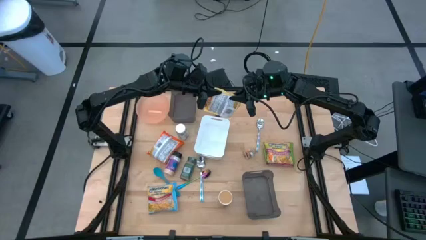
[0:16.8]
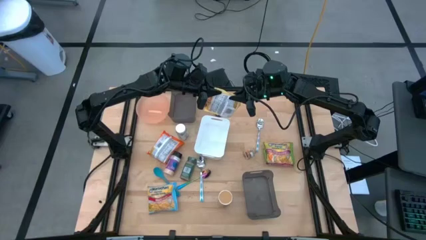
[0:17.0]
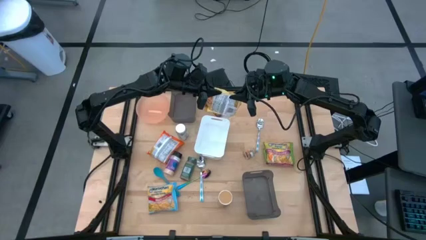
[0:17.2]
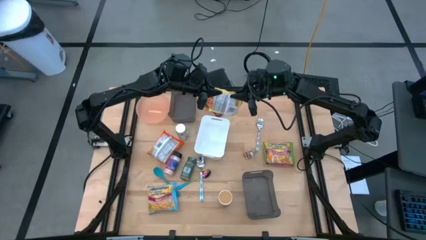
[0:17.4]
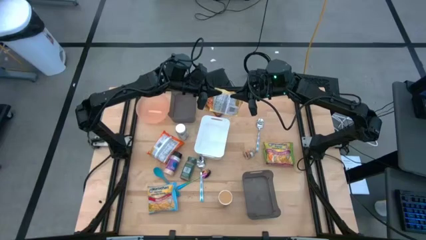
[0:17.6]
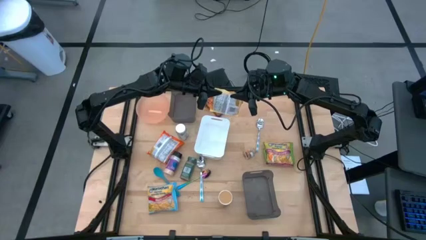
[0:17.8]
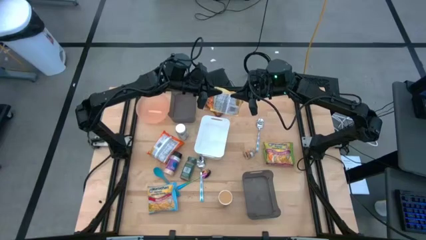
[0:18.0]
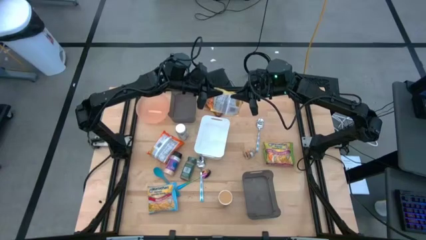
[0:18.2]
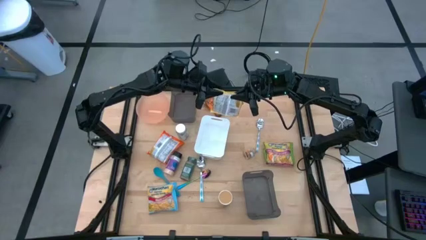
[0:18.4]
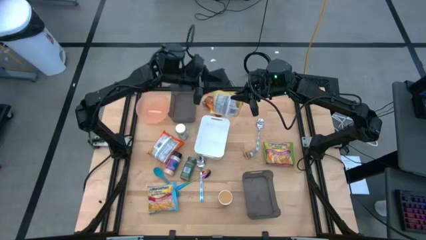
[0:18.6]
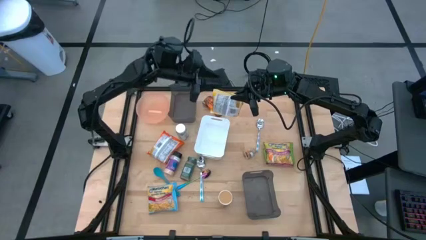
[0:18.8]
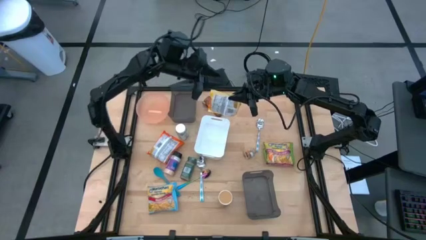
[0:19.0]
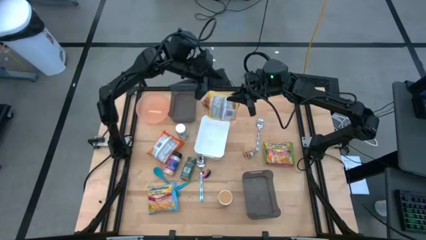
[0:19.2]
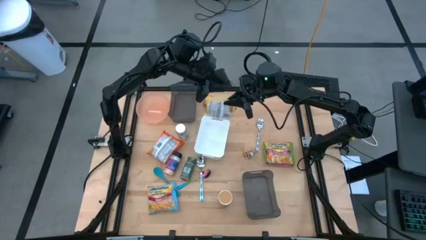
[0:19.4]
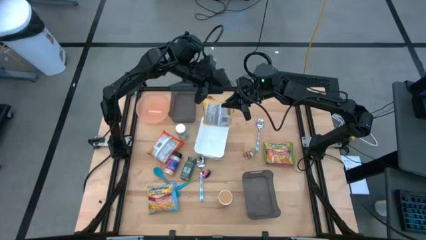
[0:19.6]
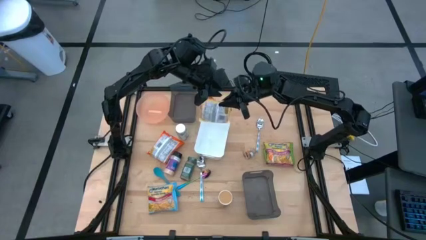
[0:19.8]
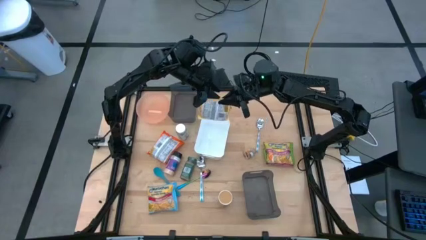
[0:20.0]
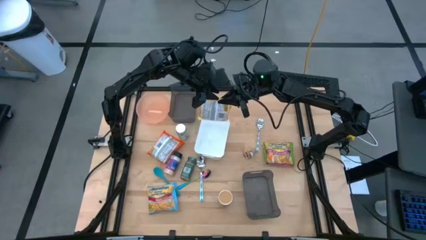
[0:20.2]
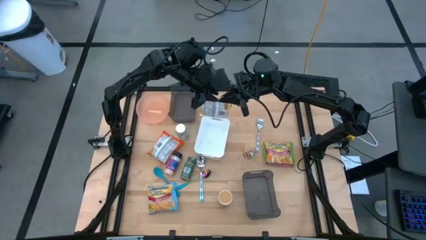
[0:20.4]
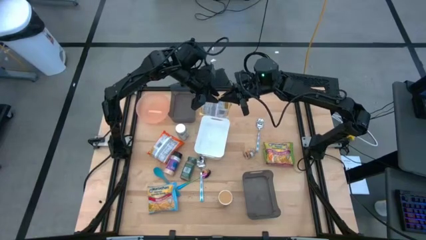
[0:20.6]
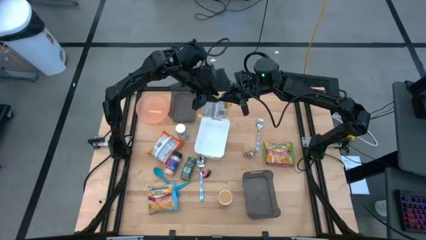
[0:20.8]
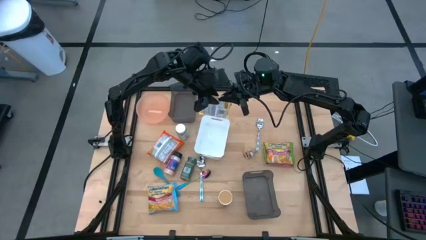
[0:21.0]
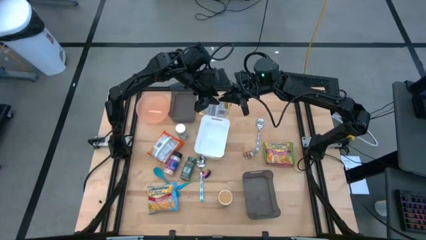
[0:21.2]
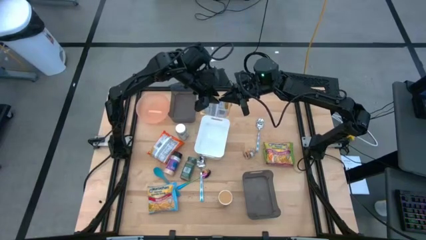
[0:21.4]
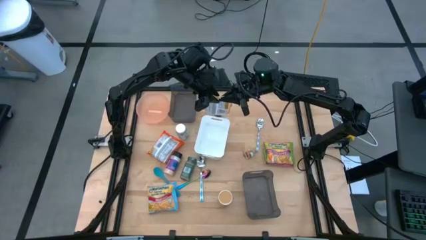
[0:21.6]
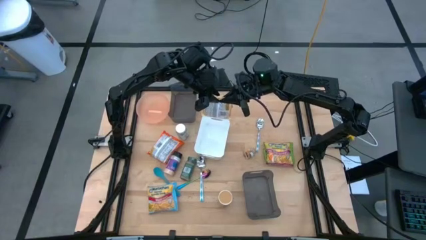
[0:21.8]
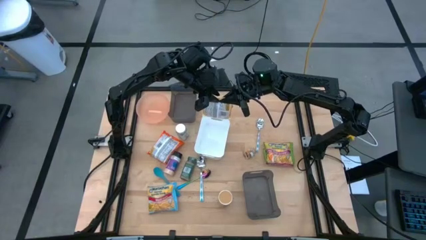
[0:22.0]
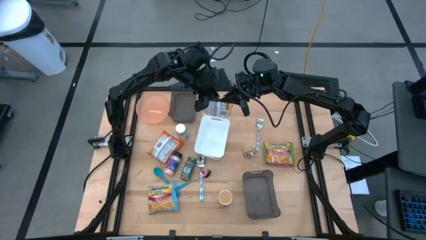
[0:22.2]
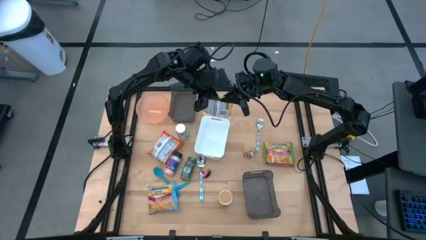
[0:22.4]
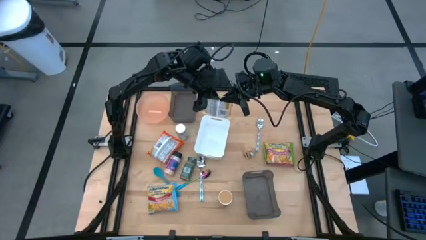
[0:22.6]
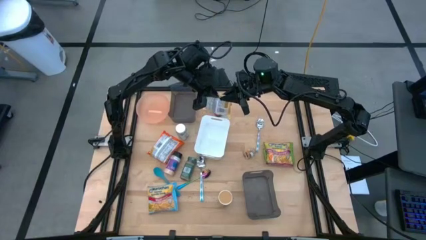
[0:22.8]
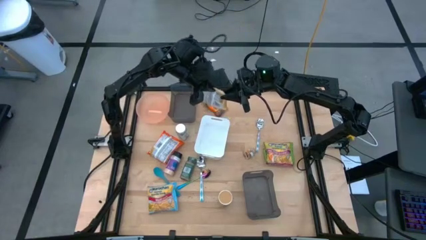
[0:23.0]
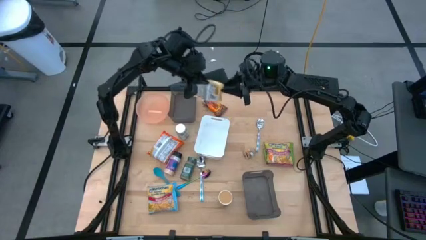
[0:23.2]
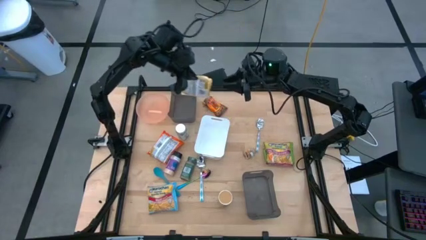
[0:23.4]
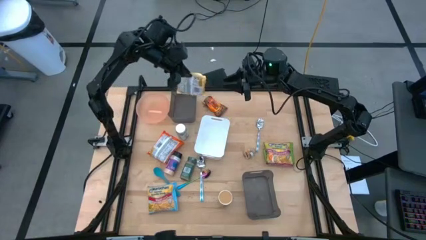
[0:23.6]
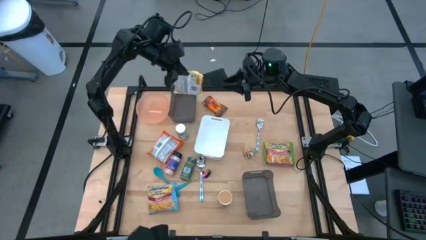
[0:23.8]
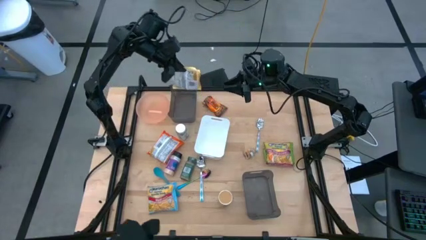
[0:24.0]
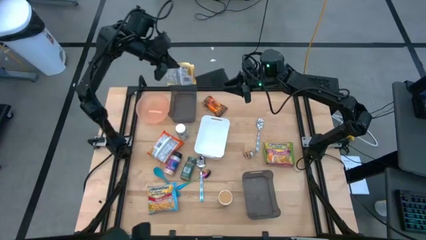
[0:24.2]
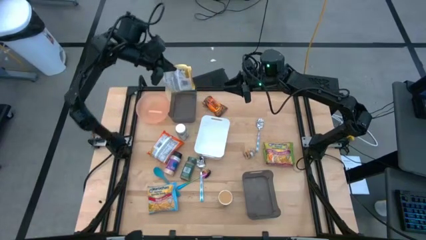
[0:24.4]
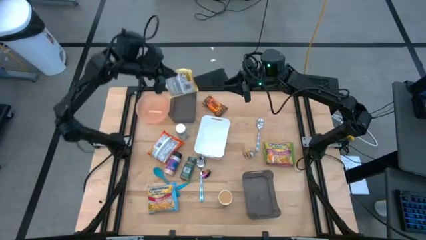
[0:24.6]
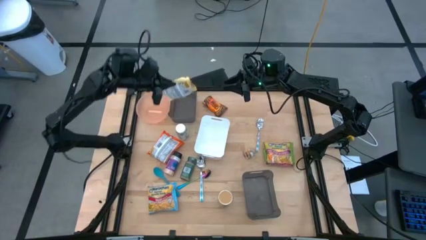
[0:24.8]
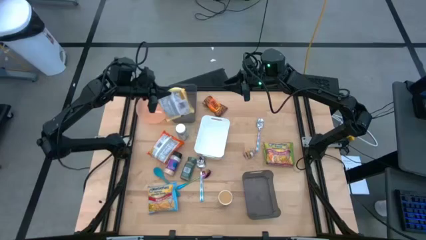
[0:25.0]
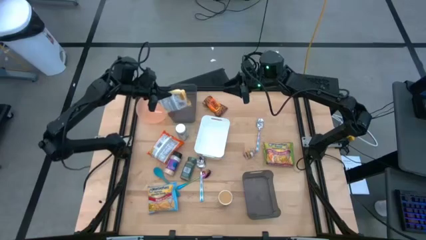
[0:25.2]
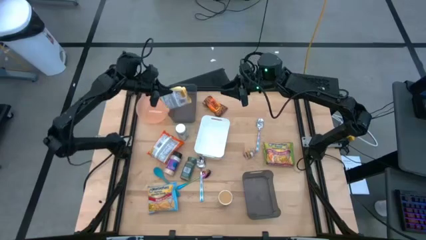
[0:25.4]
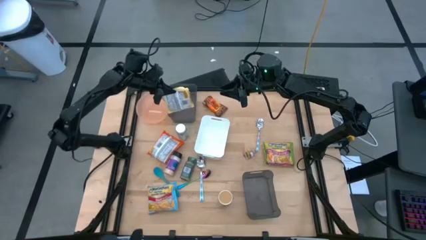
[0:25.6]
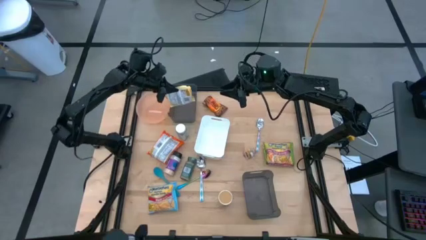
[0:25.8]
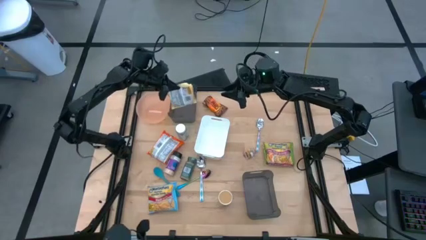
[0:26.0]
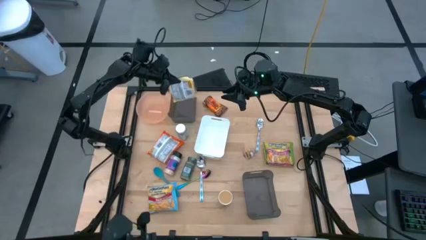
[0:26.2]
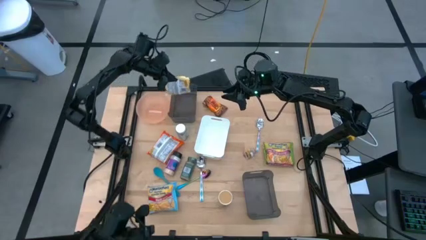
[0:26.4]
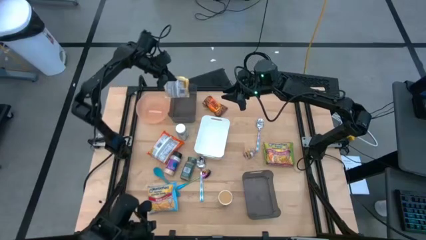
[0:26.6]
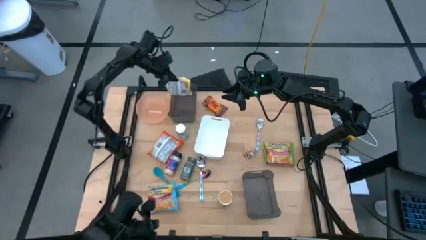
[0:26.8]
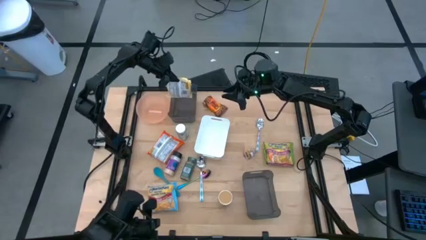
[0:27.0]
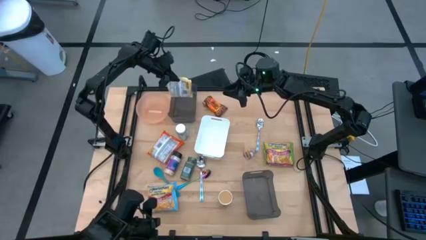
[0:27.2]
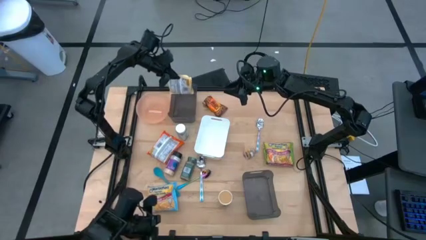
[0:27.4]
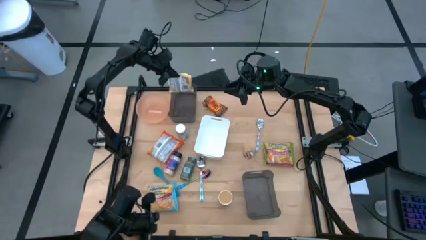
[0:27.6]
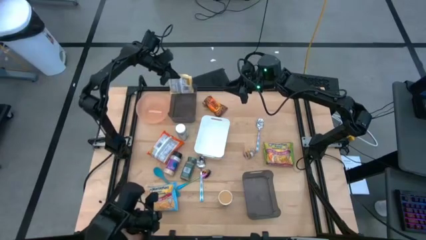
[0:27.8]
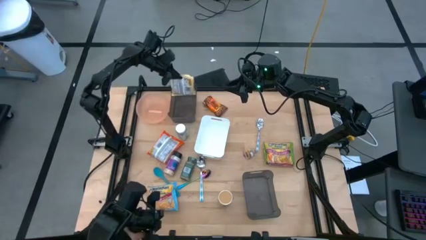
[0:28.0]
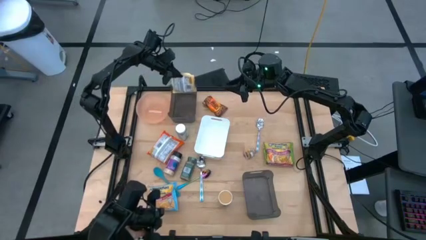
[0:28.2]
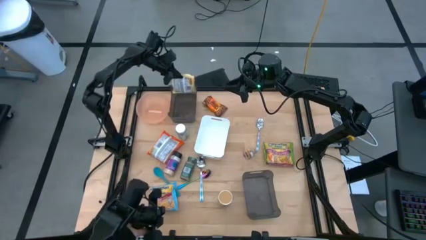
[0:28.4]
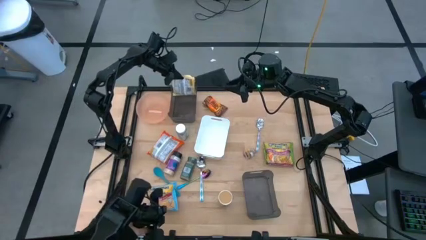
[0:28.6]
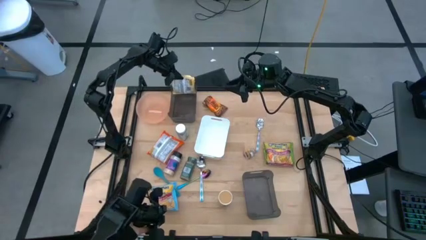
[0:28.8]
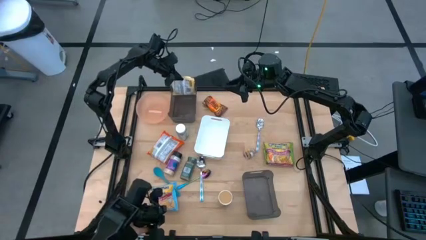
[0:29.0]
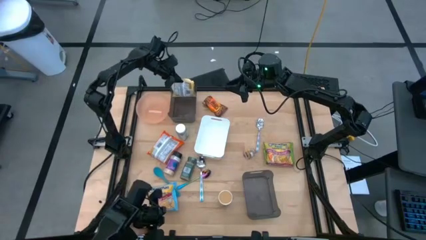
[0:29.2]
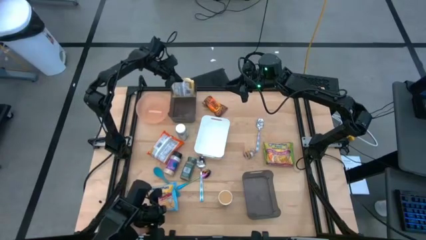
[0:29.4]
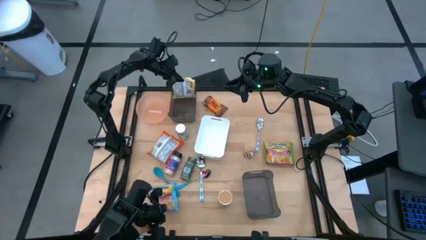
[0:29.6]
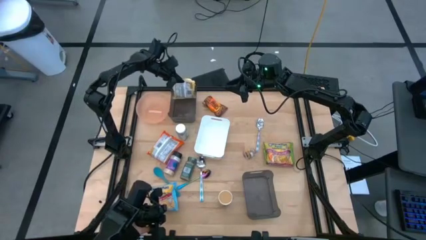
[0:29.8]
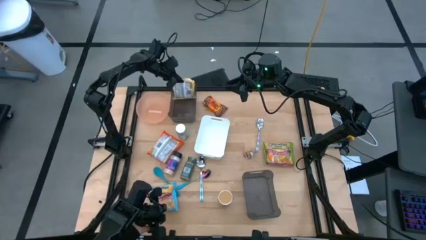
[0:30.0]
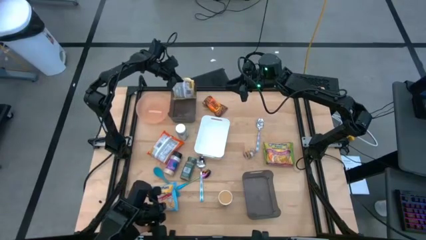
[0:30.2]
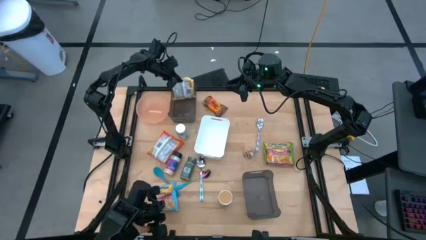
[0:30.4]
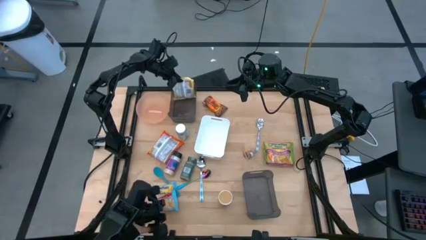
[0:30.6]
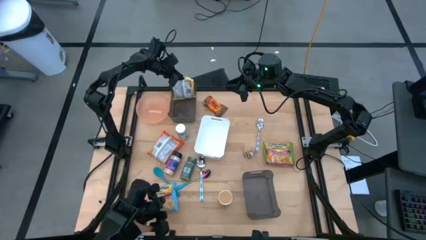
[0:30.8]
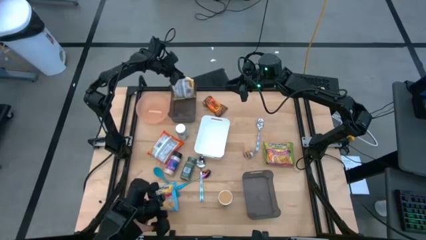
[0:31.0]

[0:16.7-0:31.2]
Task: Pick & Place Food Item
Put the yellow noodle pack into the top black bin
